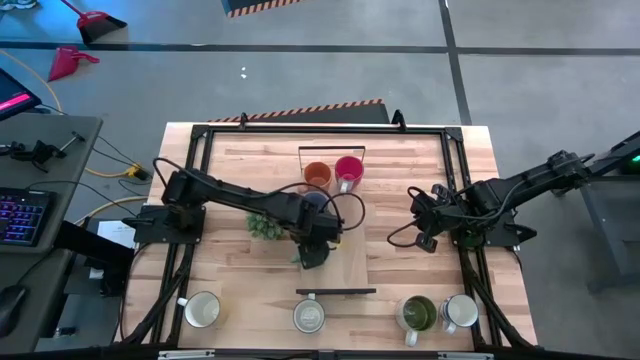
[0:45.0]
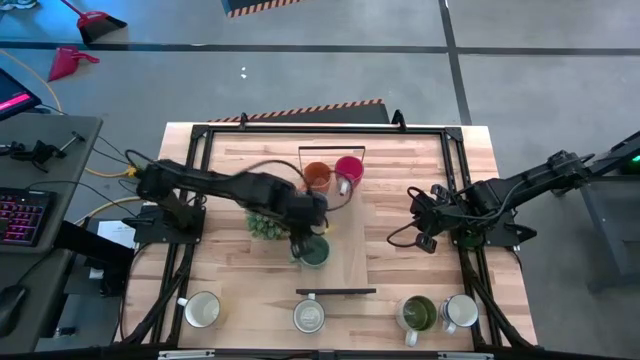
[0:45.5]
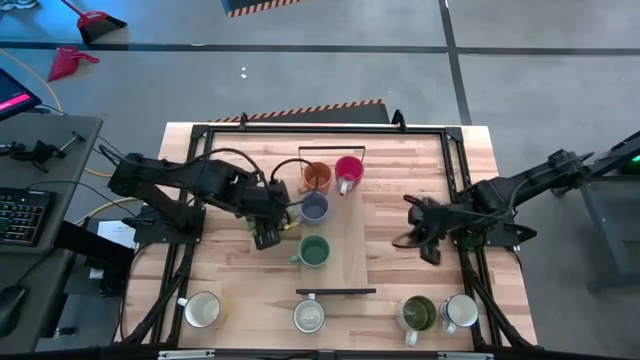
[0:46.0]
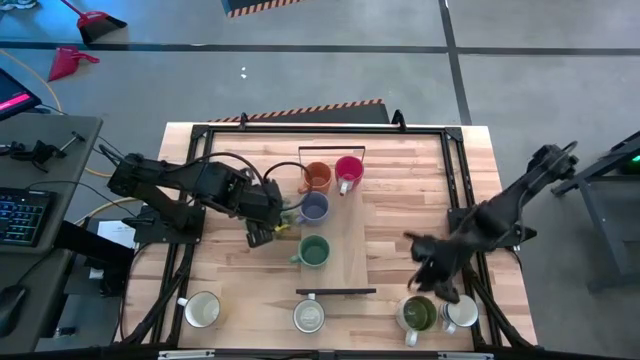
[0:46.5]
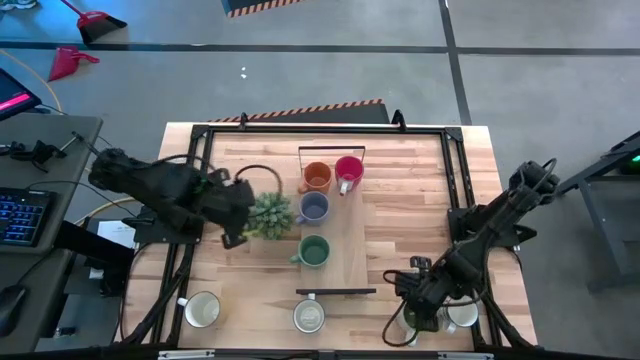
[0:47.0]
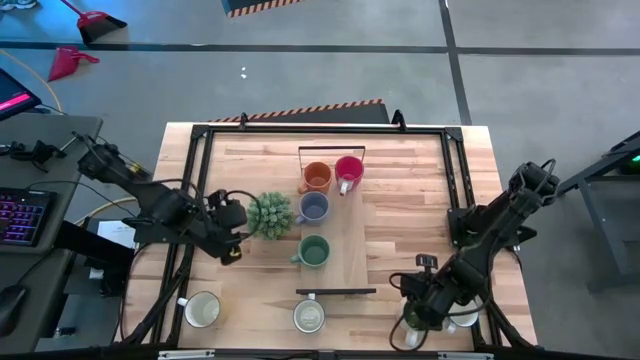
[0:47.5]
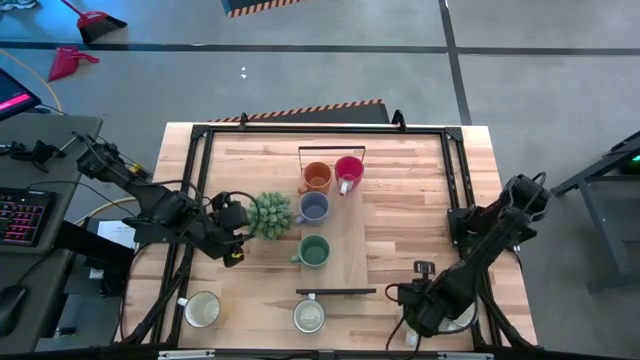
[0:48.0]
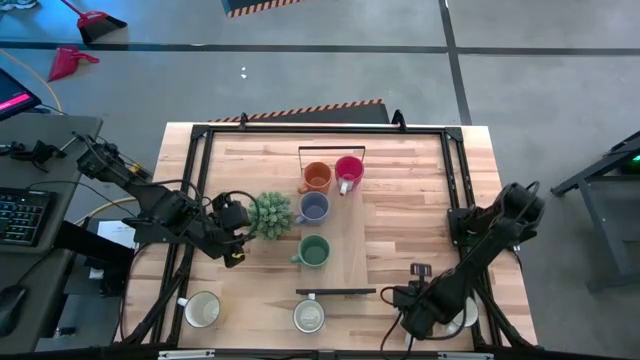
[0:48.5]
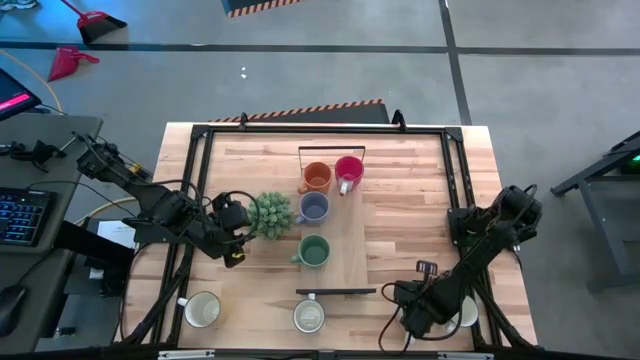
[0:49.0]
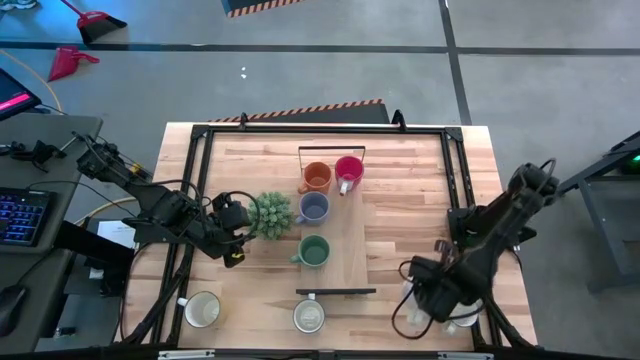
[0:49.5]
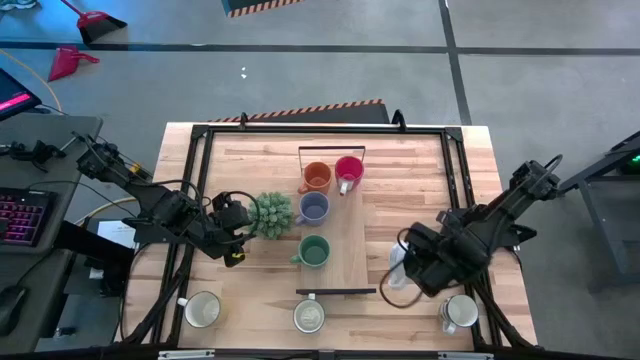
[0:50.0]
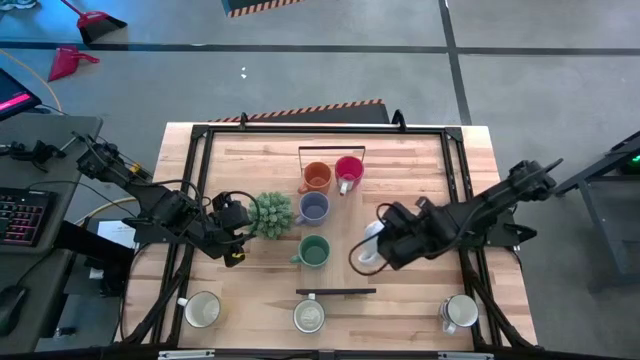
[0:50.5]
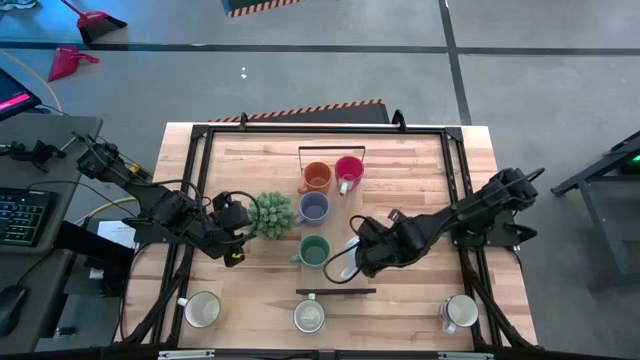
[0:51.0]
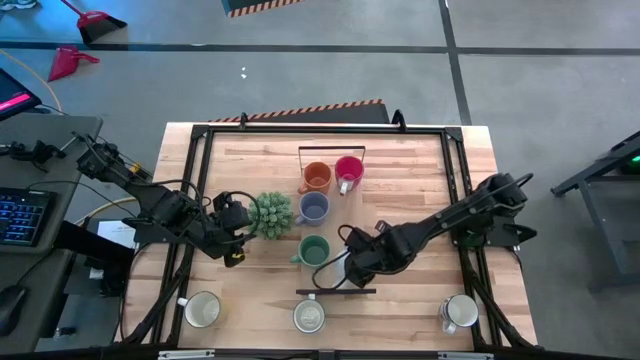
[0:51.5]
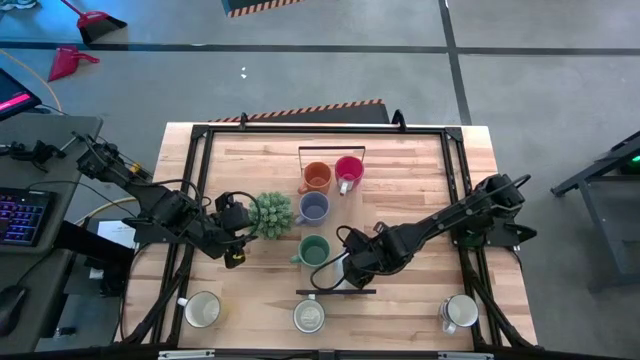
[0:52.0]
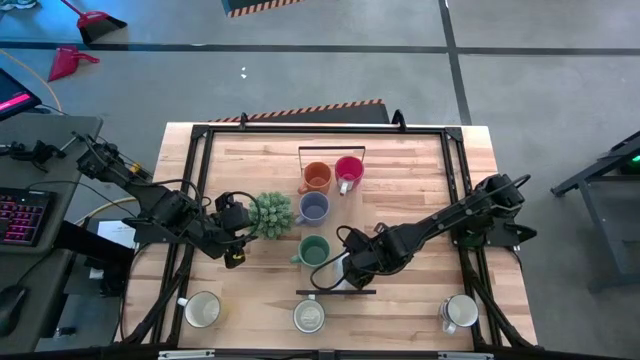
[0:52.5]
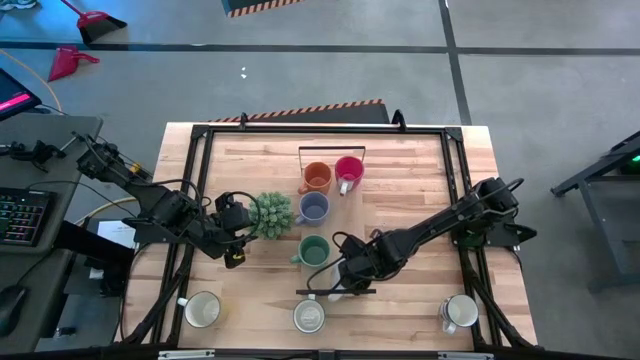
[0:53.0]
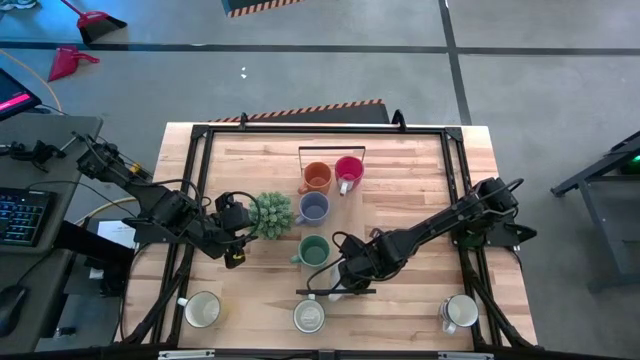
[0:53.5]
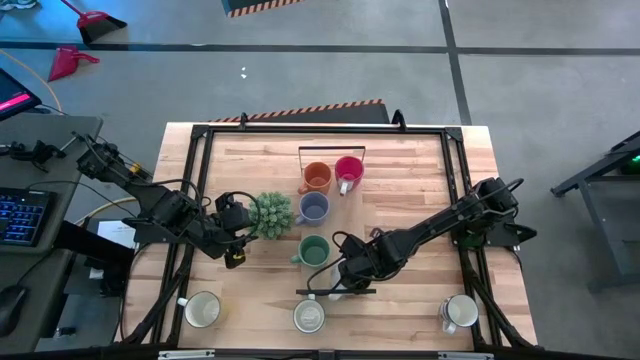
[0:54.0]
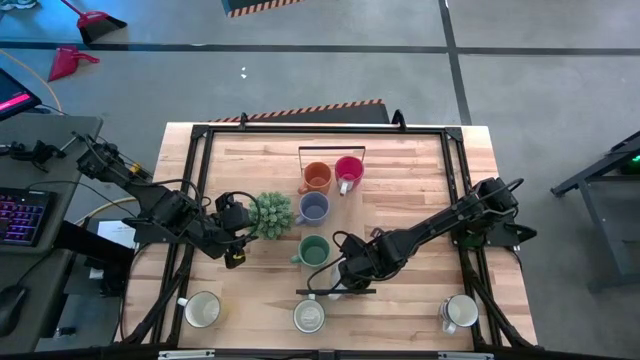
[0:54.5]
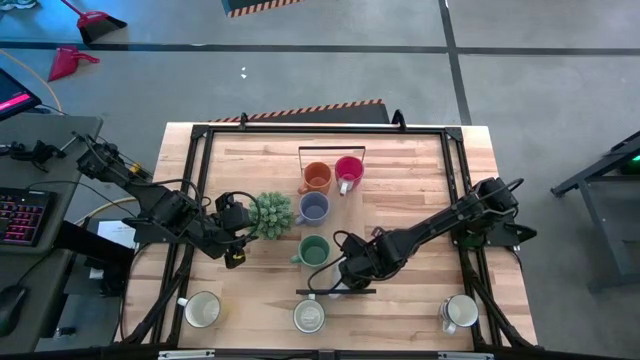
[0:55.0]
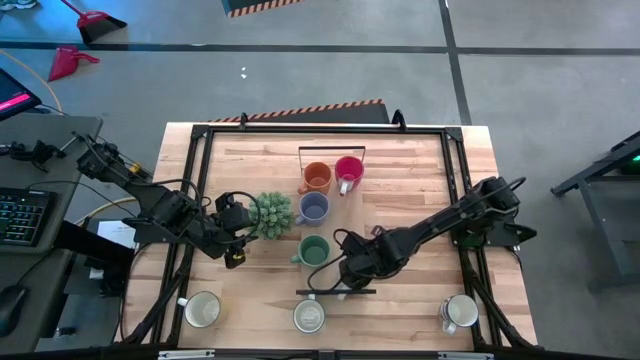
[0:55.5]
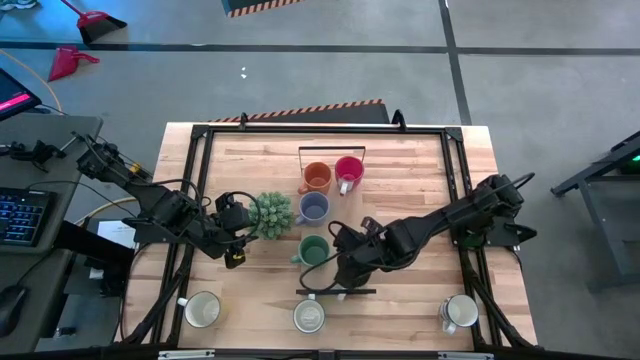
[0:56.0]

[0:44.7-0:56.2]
Task: Place coffee mugs
Put the green mug on the shelf

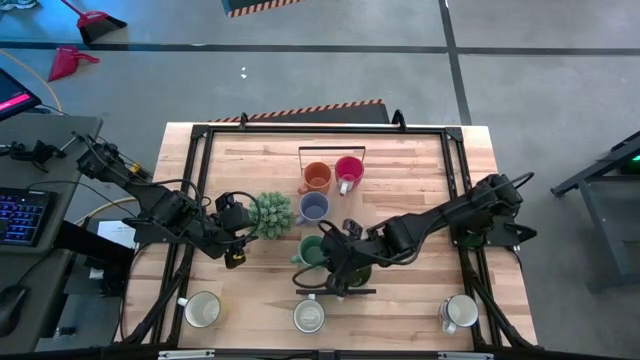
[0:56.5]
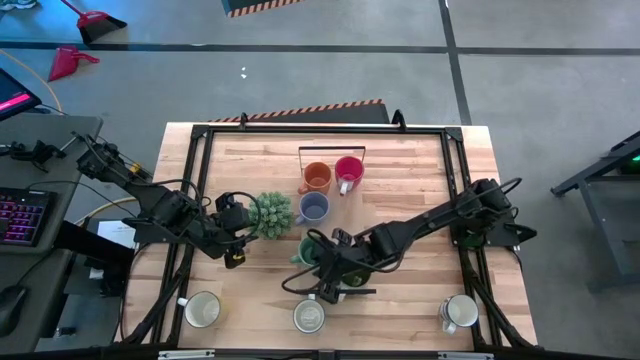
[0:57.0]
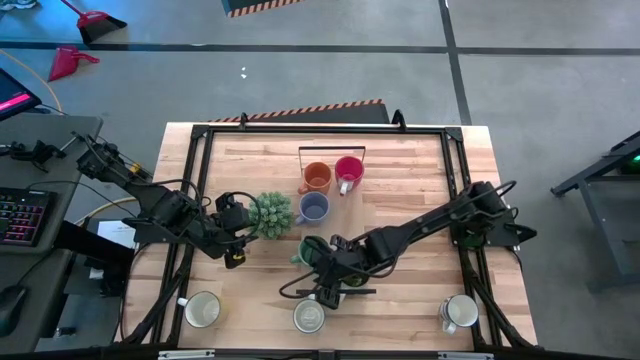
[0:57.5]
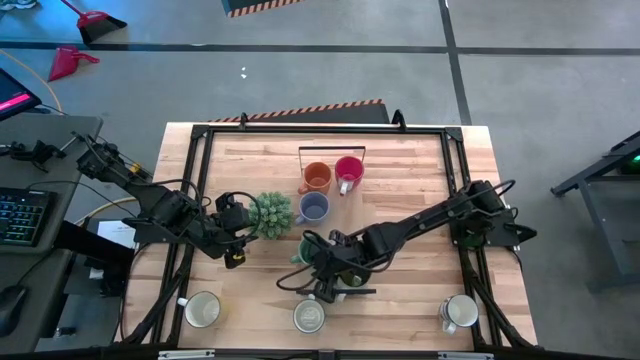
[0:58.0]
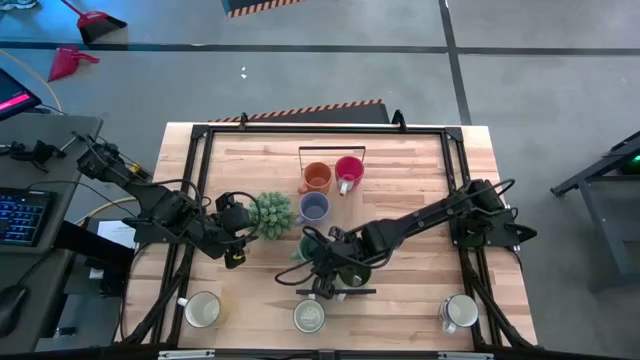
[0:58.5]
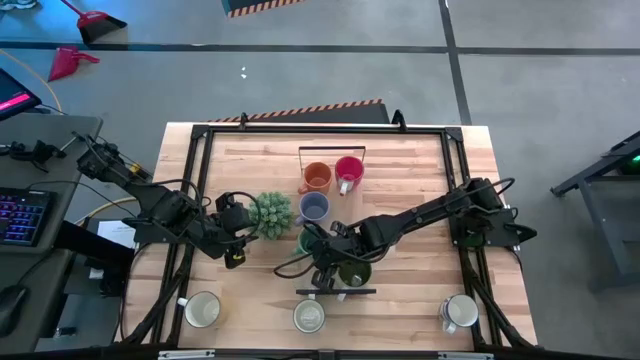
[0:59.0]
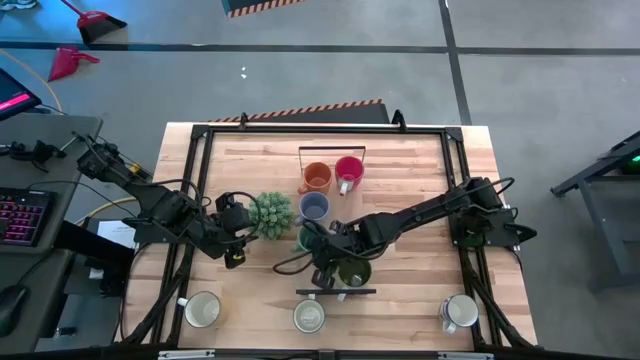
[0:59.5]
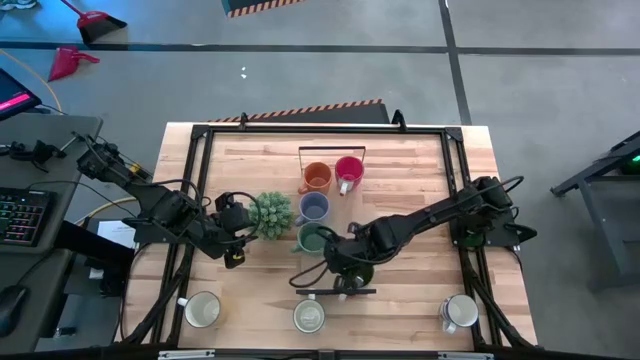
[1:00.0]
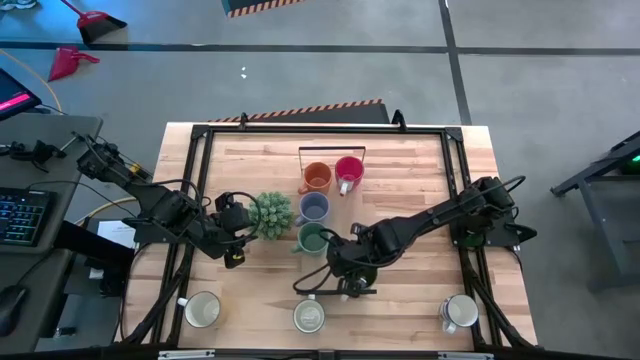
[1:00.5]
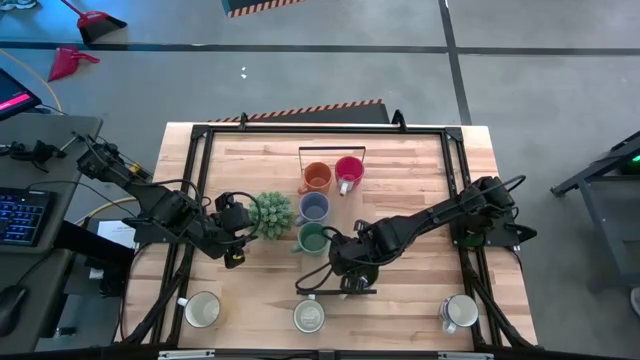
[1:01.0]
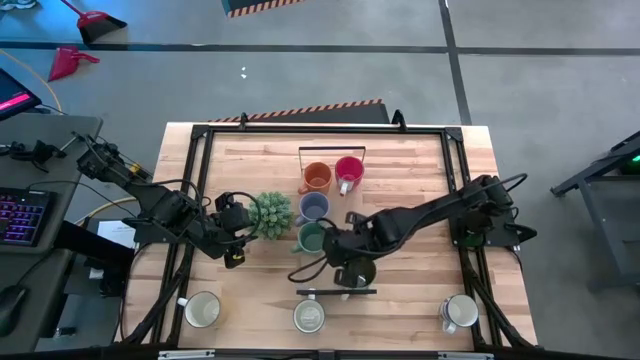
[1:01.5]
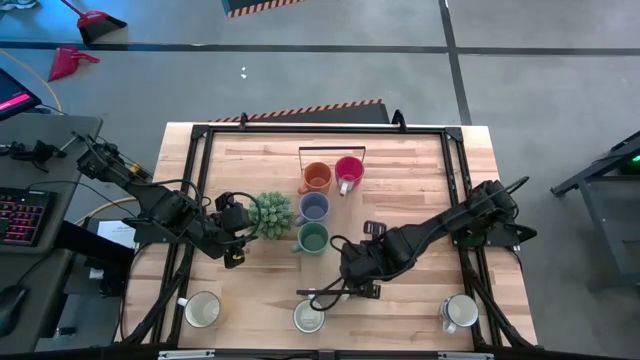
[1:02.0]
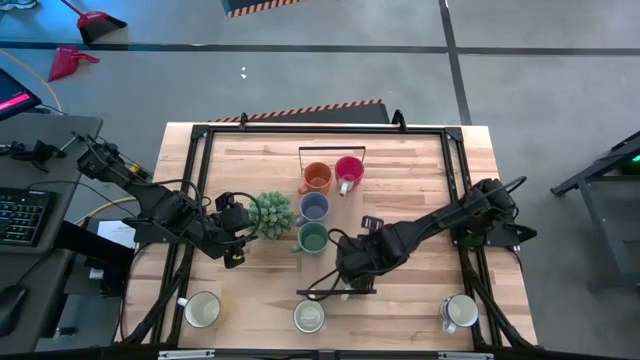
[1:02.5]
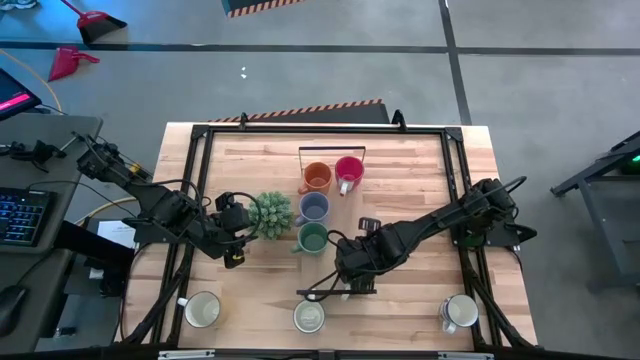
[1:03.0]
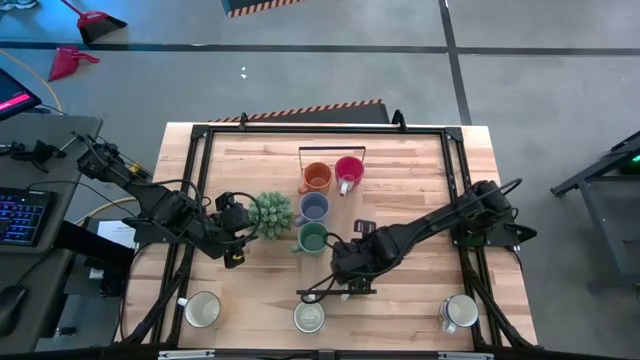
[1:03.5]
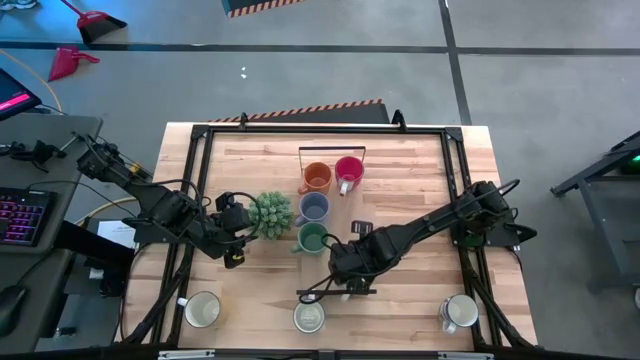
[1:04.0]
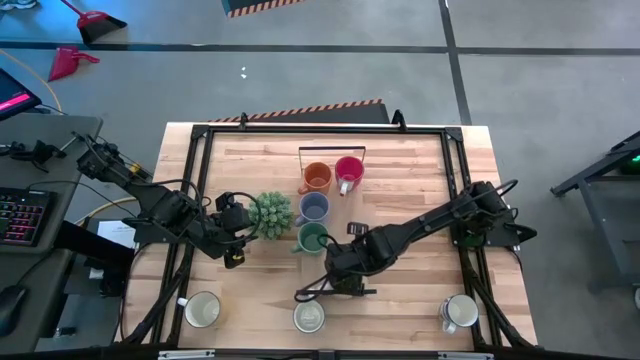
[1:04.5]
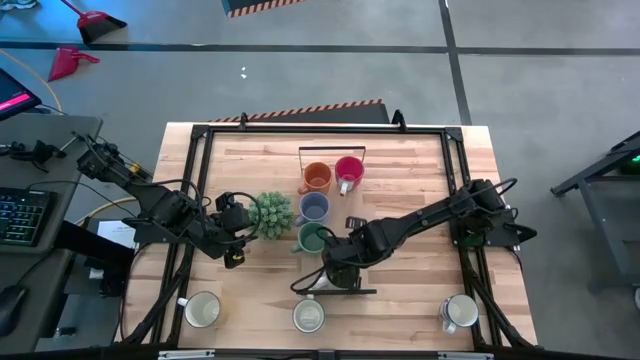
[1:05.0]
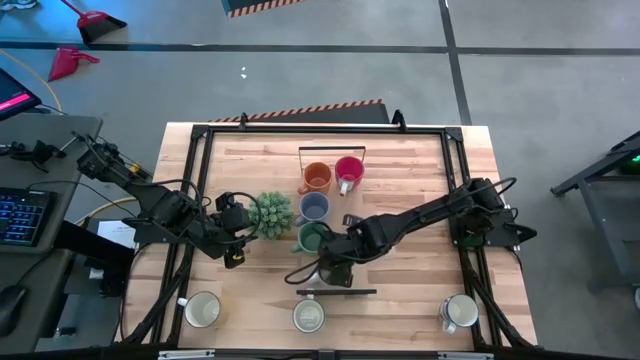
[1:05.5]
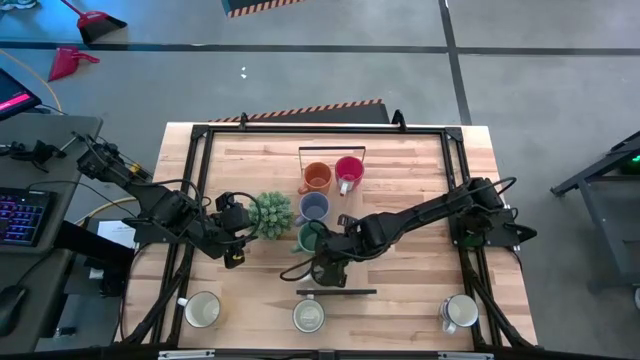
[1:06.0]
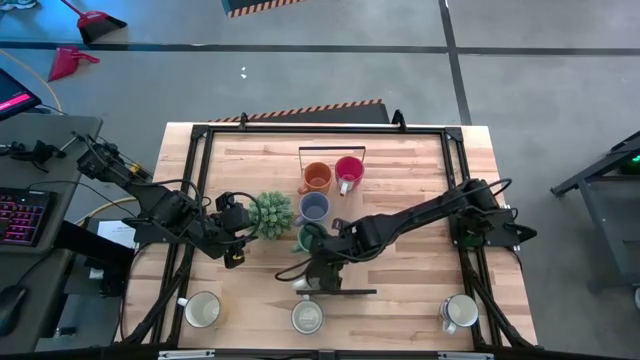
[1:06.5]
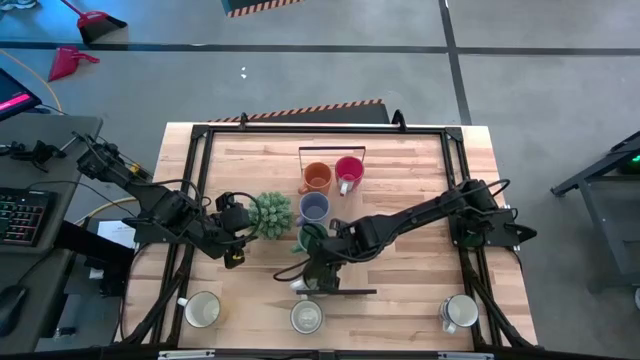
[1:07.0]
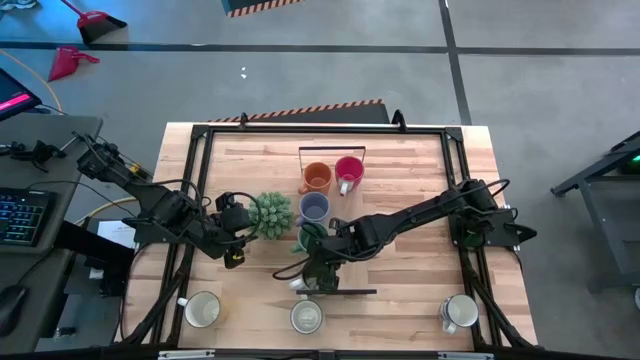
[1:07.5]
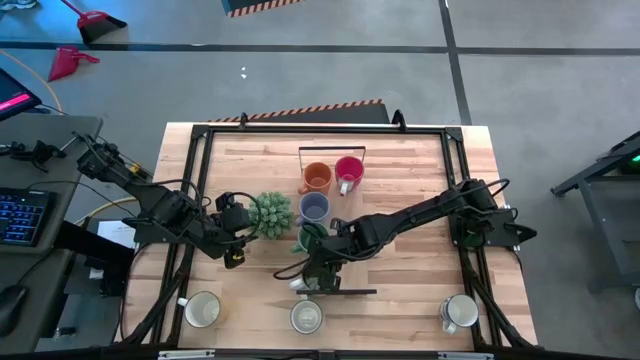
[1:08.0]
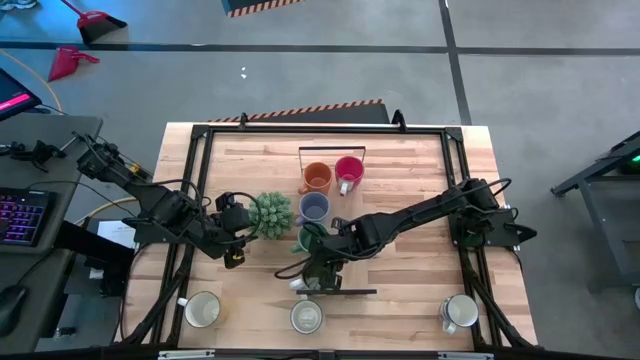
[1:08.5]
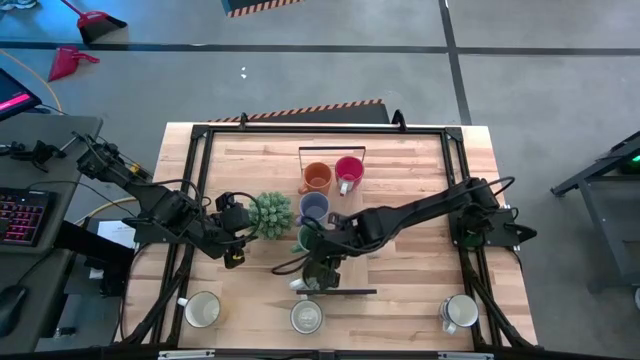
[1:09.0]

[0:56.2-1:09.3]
Adjust the mugs on the shelf
